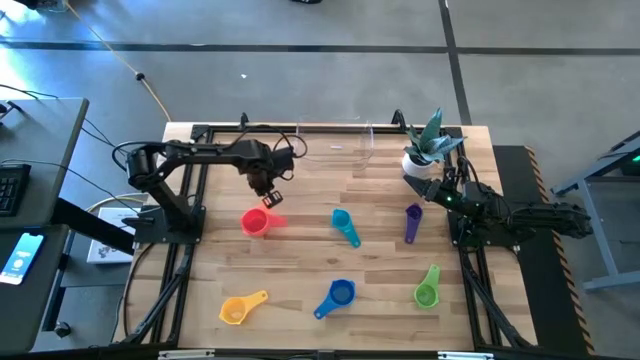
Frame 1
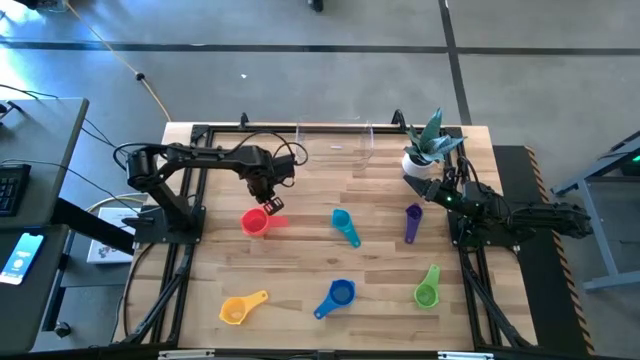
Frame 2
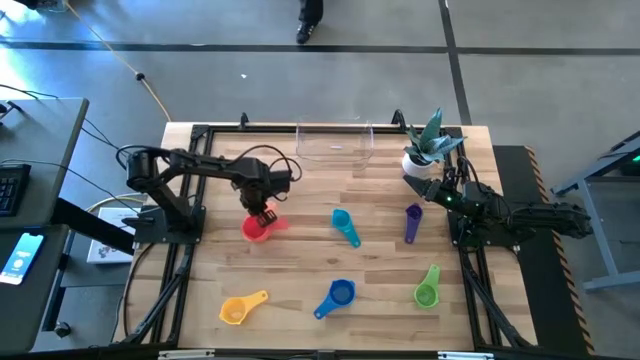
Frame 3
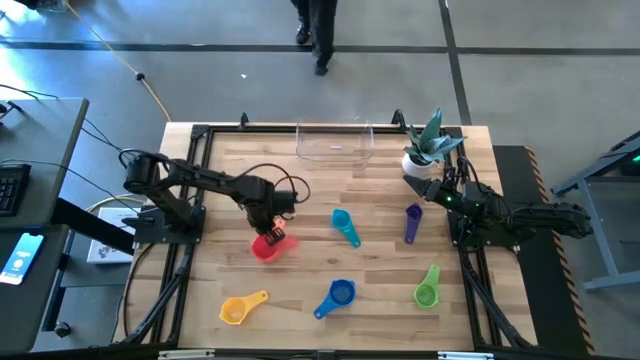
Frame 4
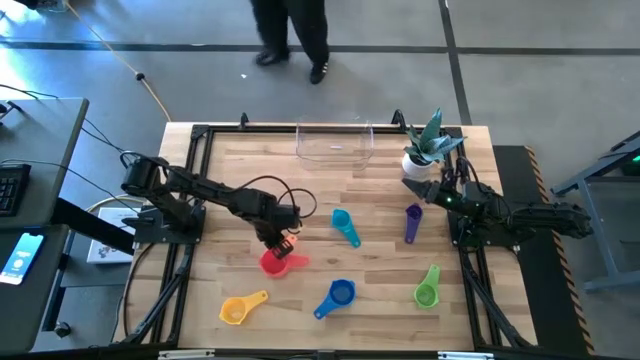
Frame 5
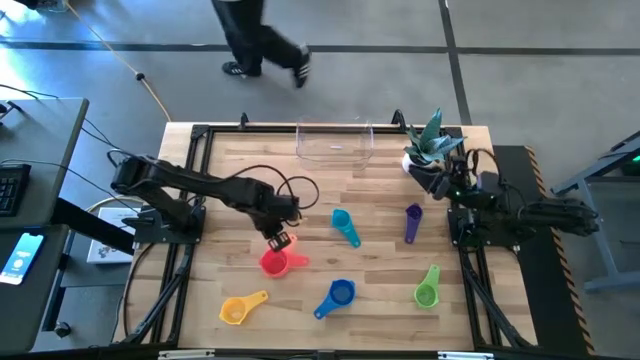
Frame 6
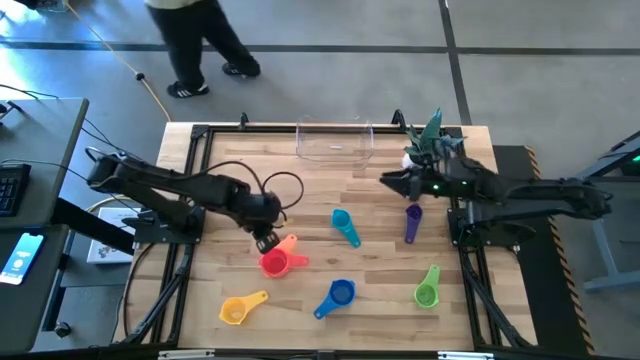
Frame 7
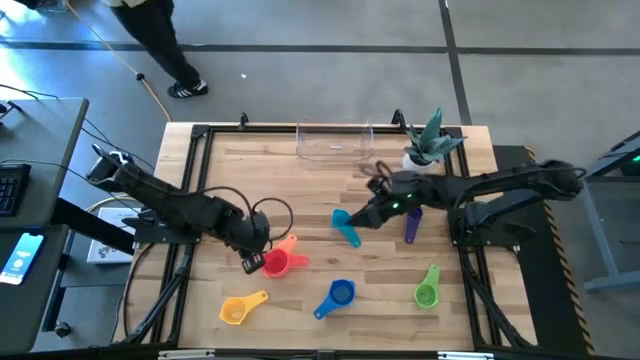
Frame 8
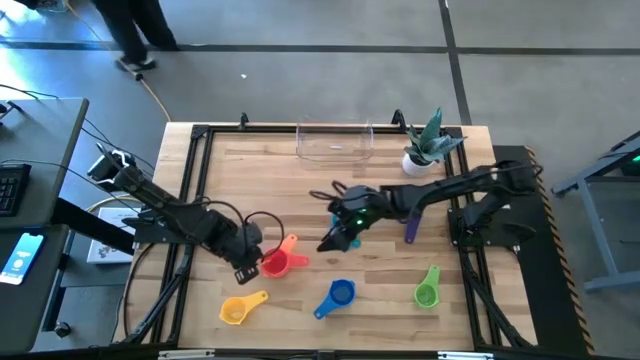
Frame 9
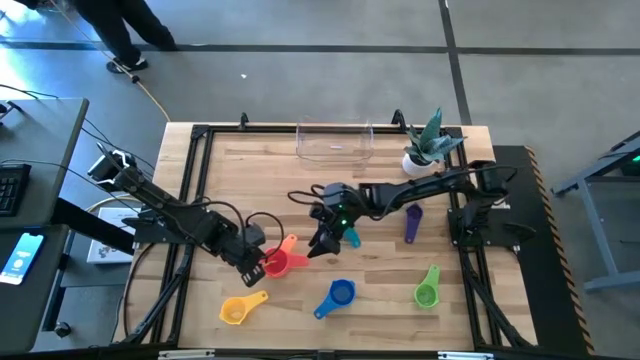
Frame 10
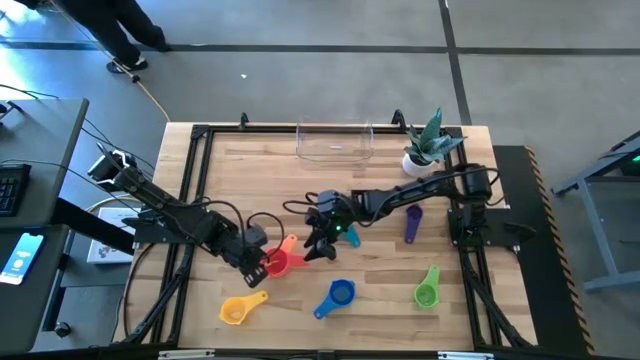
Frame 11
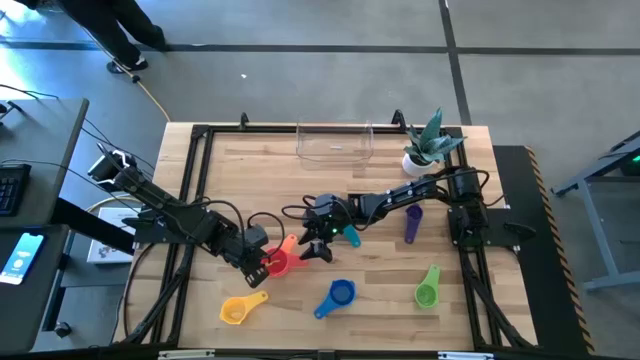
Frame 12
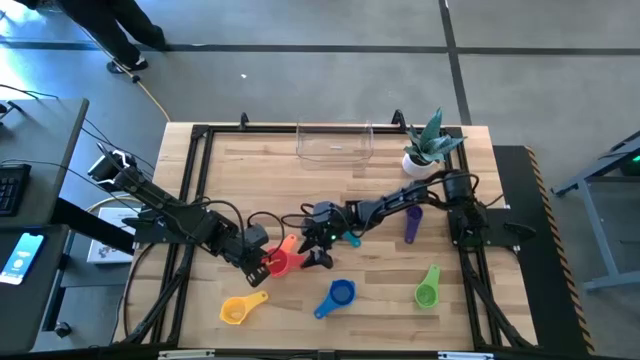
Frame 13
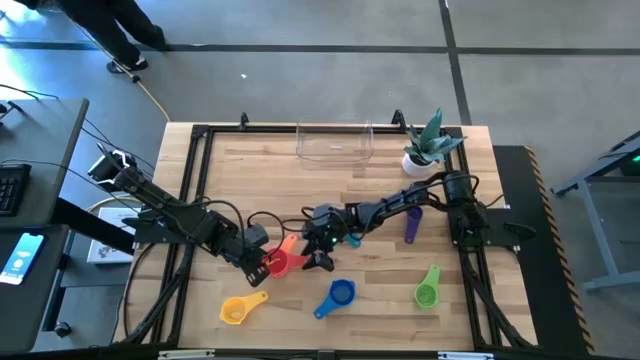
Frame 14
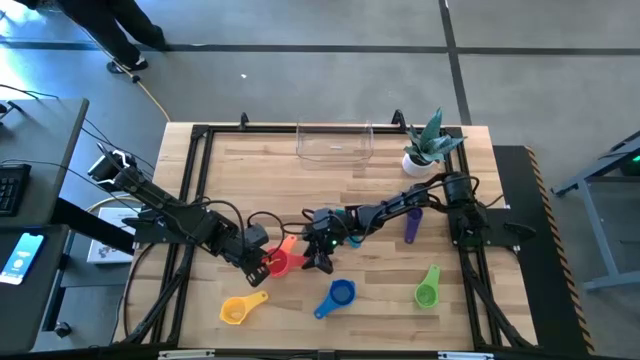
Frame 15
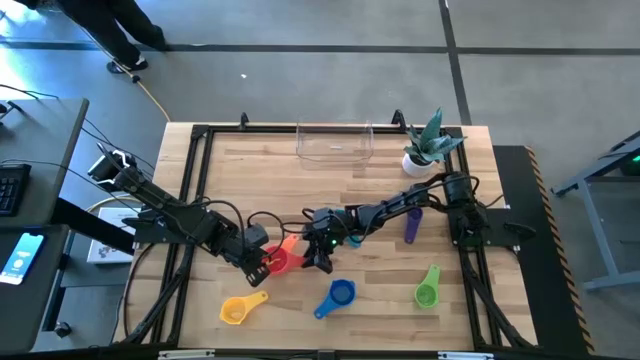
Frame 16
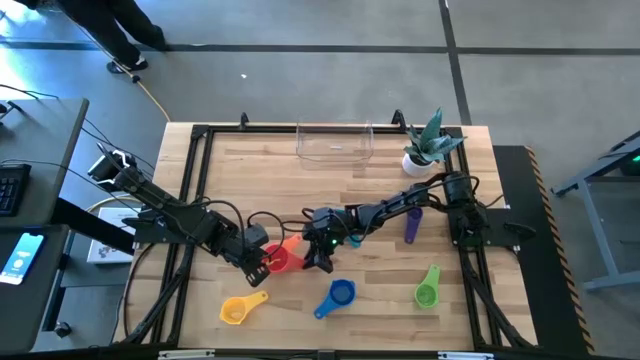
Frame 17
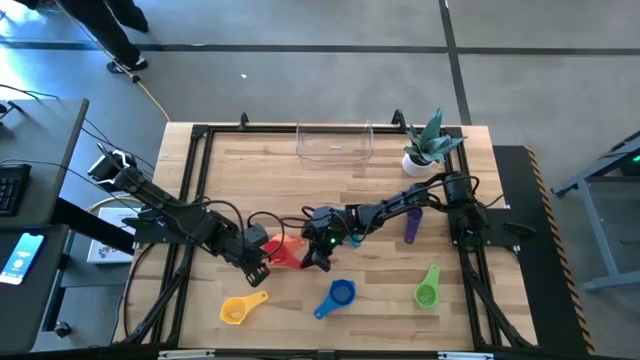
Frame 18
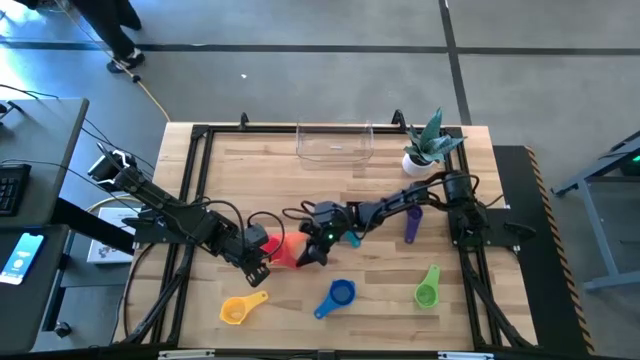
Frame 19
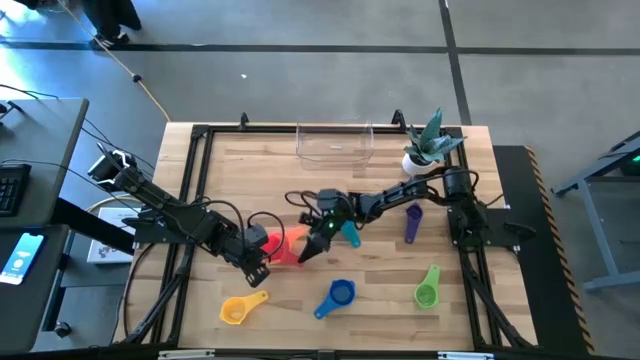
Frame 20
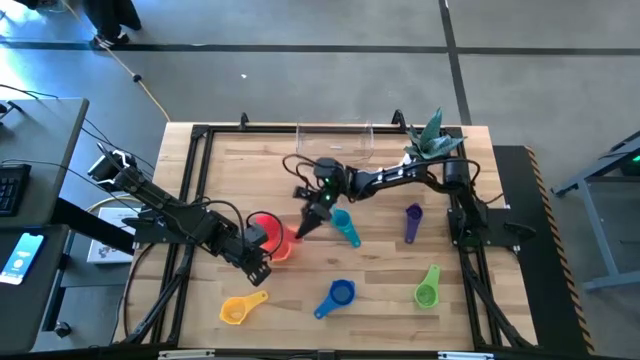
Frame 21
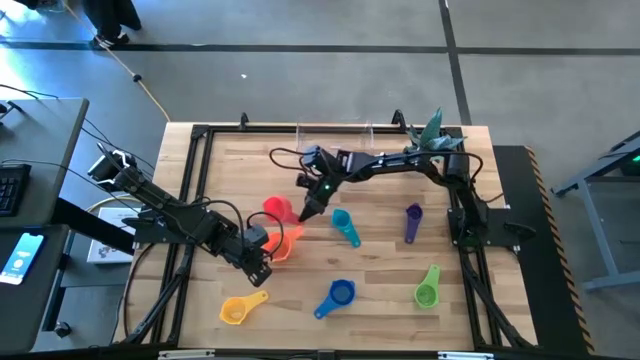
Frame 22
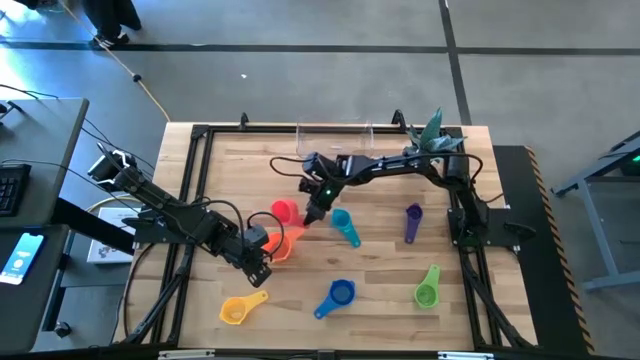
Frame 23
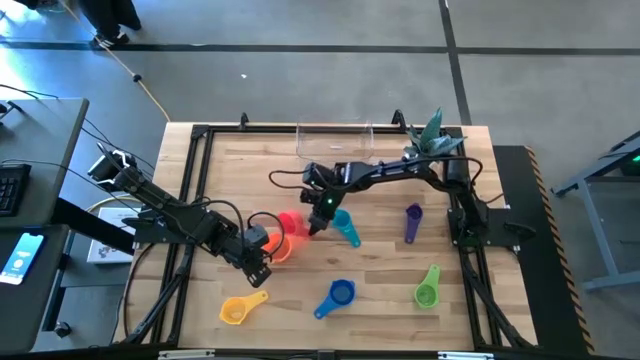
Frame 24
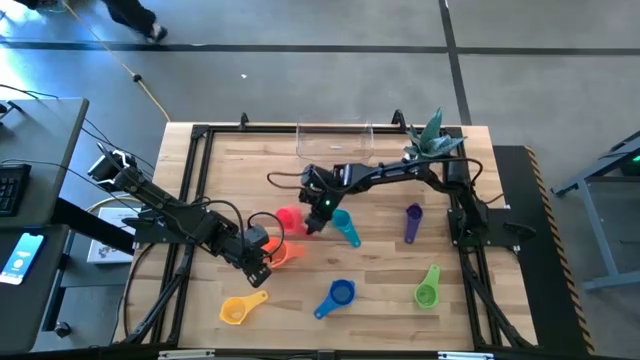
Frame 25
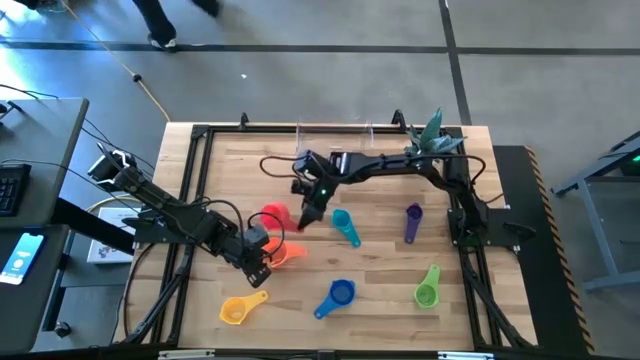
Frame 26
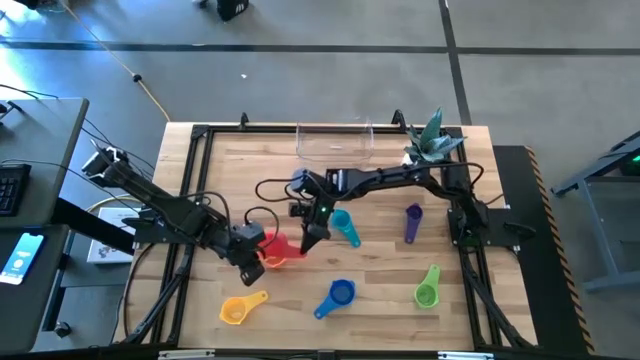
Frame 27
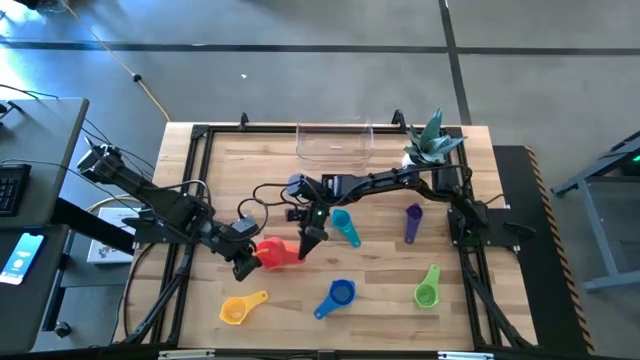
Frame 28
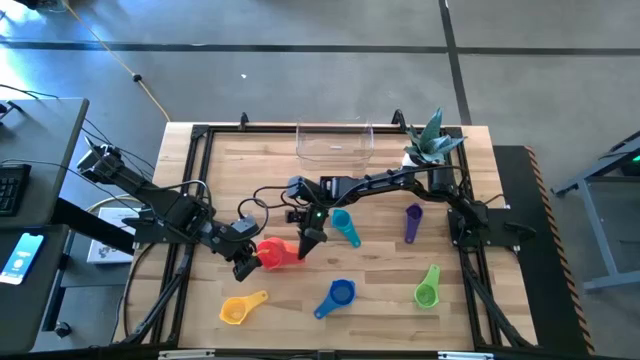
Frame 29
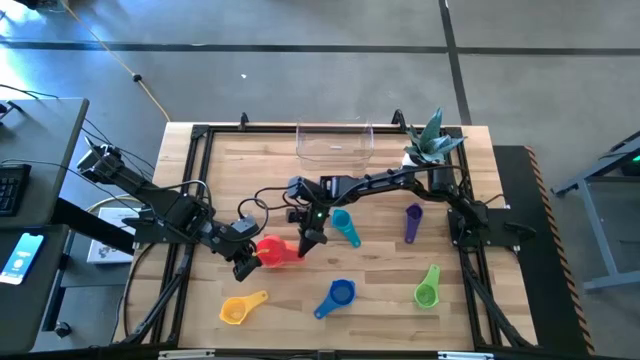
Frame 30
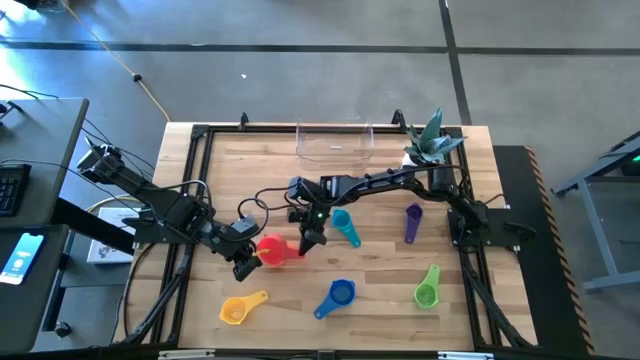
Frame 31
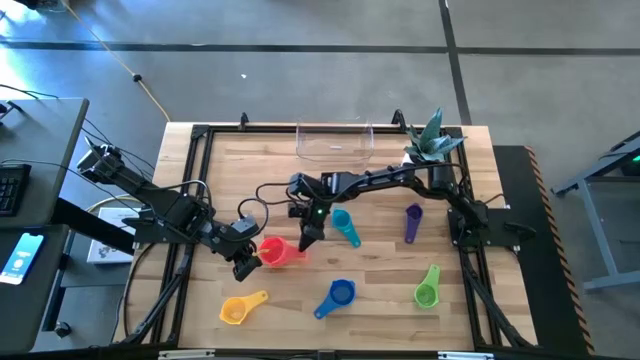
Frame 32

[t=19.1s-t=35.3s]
Task: Nest measuring cups in basket
Stack the red measuring cup on top of the orange measuring cup

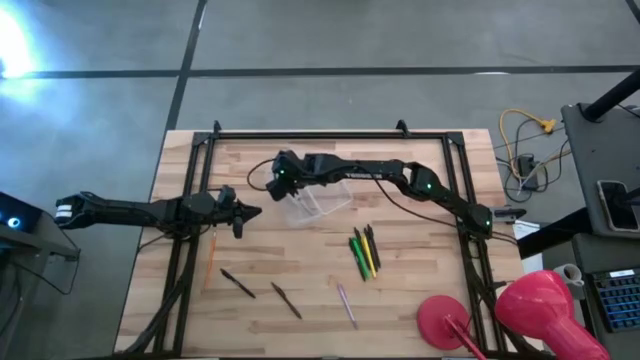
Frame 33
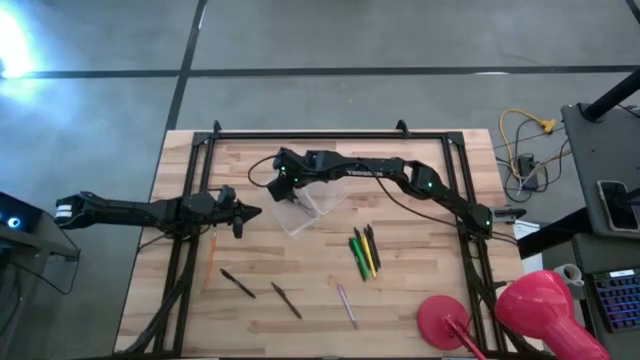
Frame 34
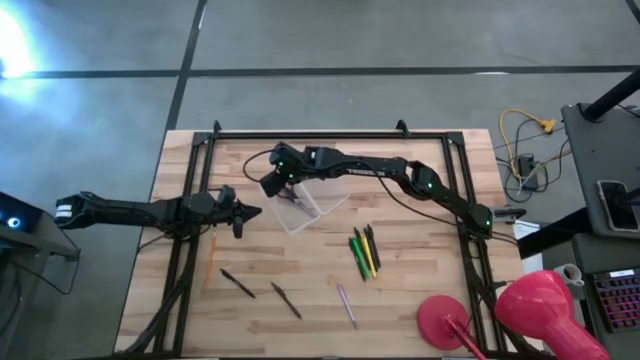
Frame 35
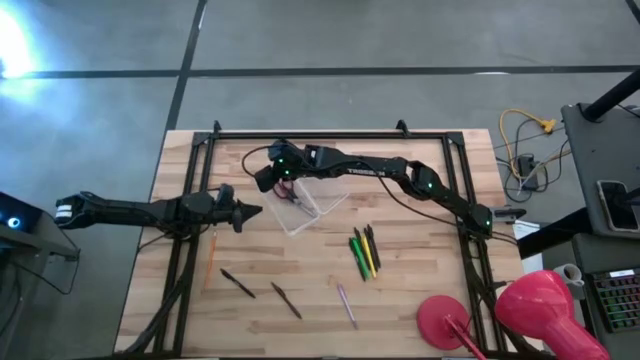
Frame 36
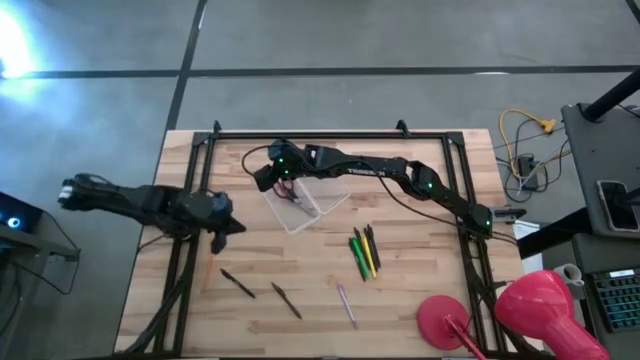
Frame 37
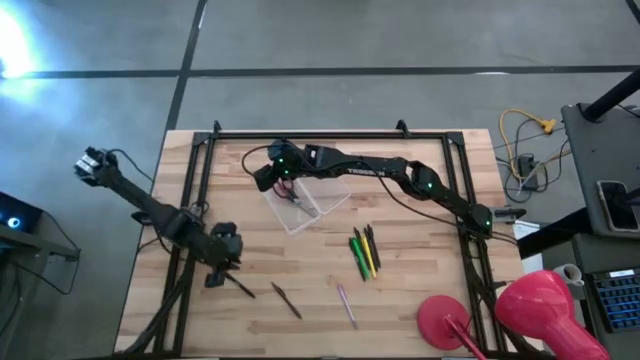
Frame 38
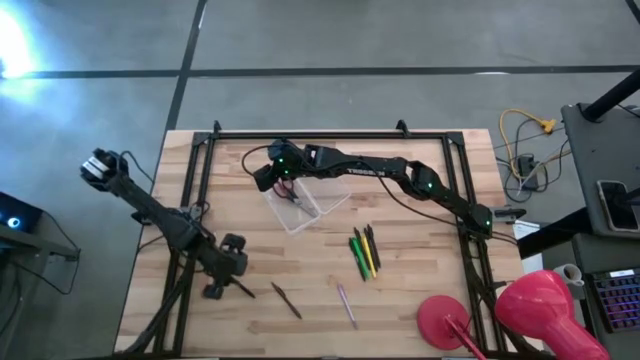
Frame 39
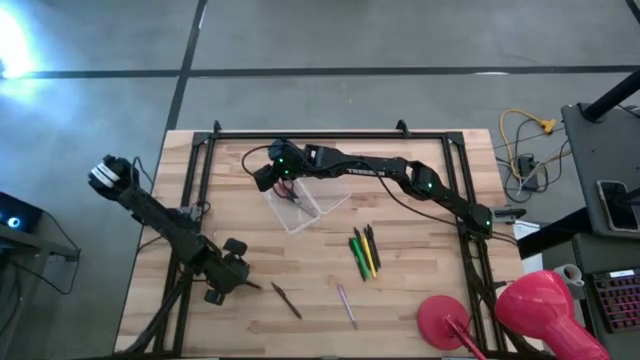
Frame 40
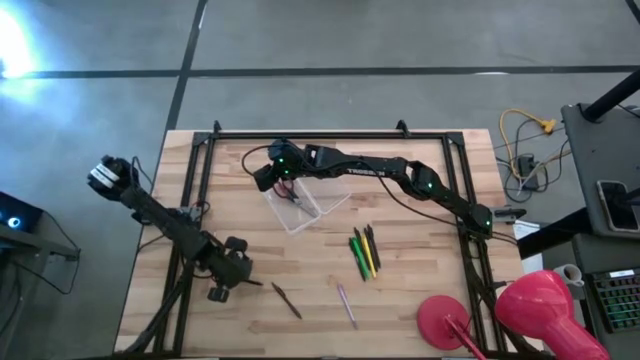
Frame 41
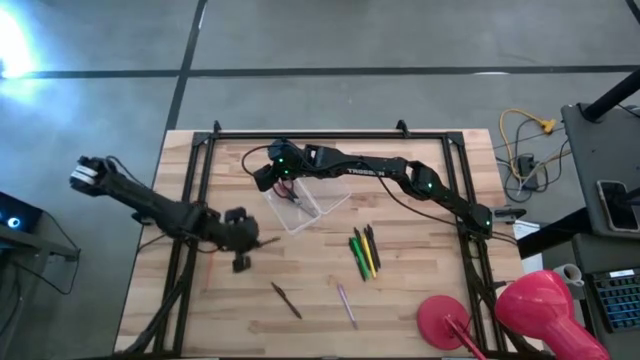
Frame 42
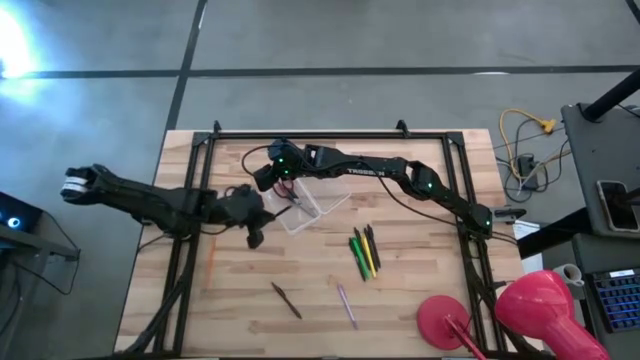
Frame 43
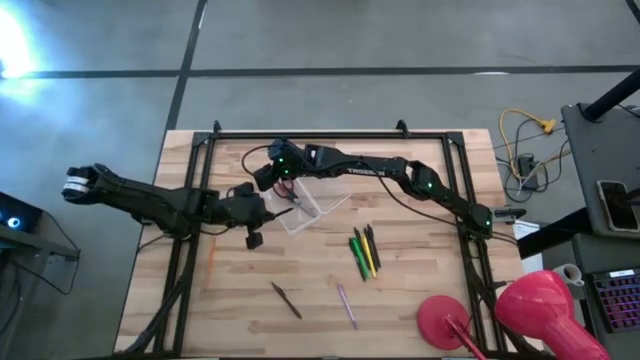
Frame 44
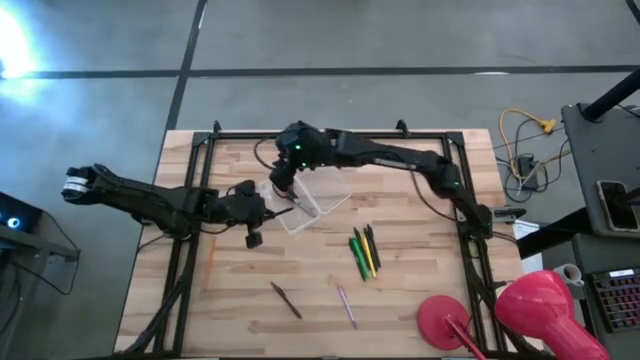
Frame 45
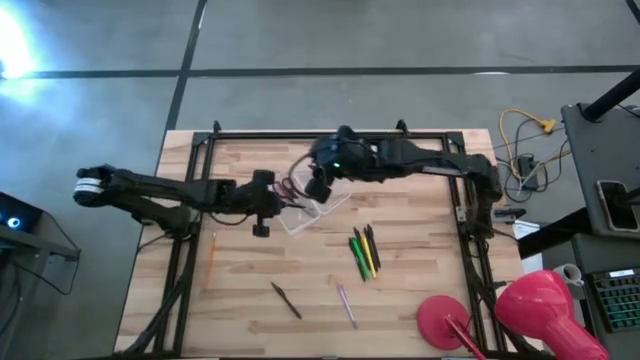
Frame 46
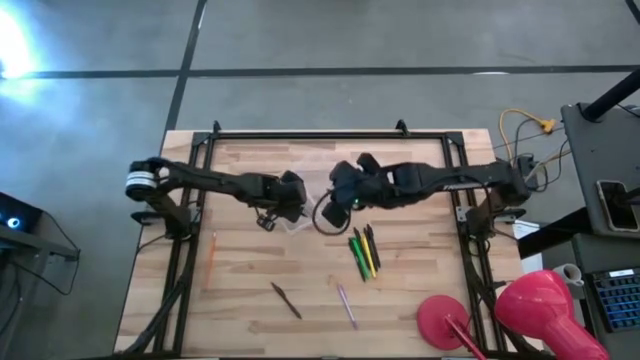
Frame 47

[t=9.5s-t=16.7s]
Task: Pick & place school supplies into a supply box
Put the black pen into the transparent supply box
